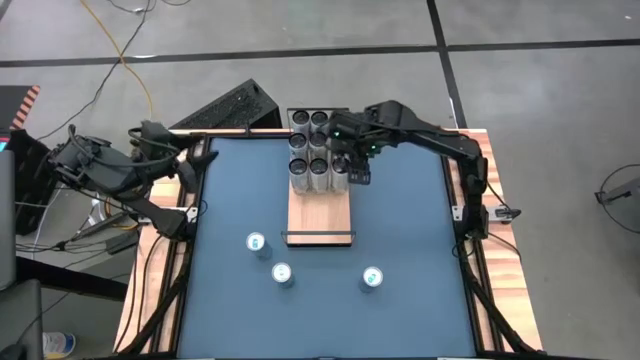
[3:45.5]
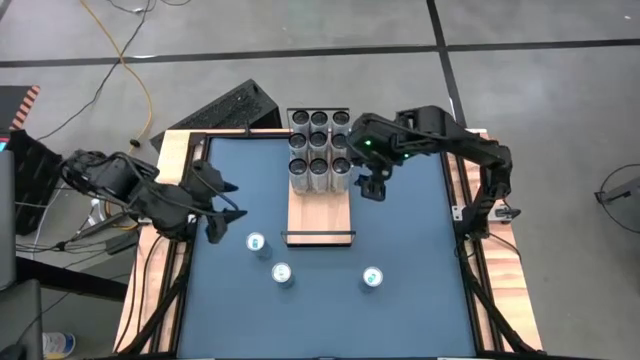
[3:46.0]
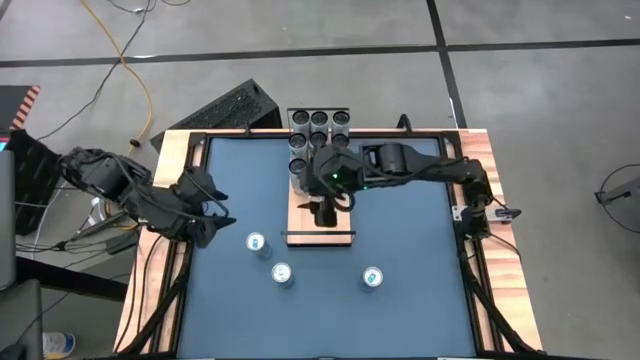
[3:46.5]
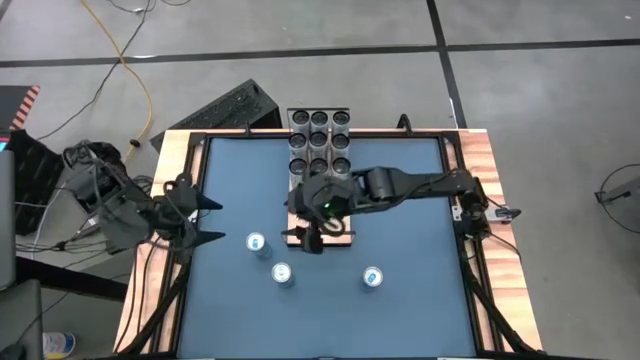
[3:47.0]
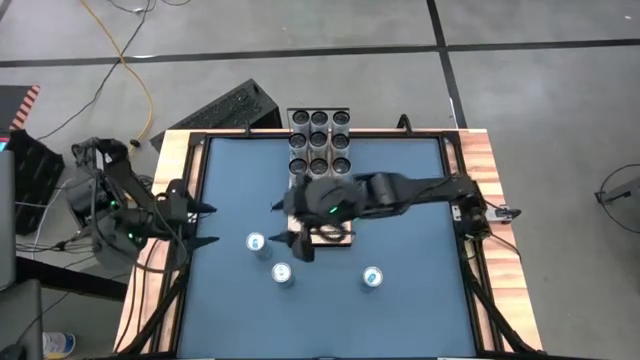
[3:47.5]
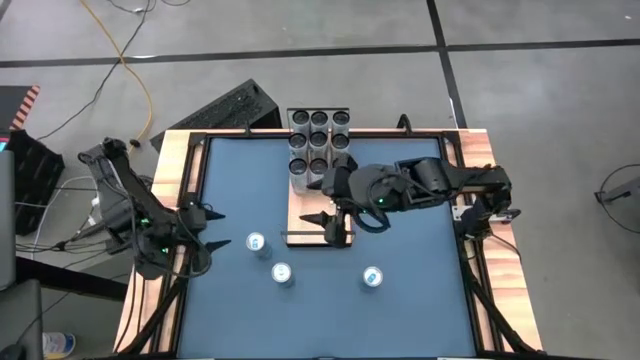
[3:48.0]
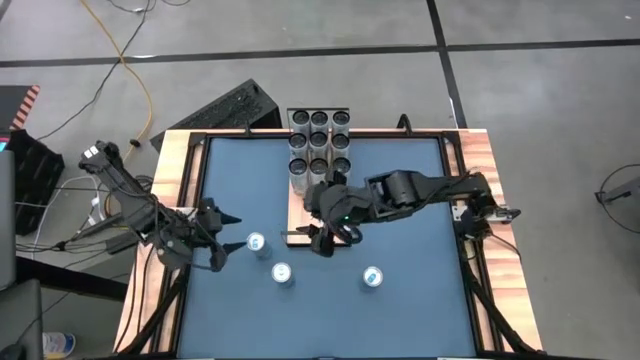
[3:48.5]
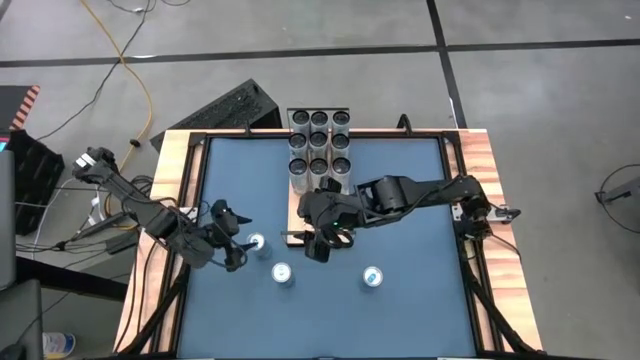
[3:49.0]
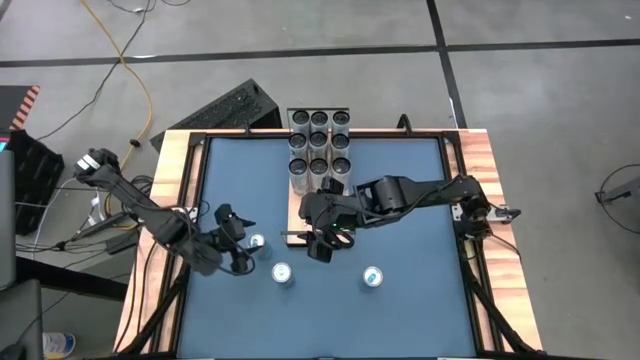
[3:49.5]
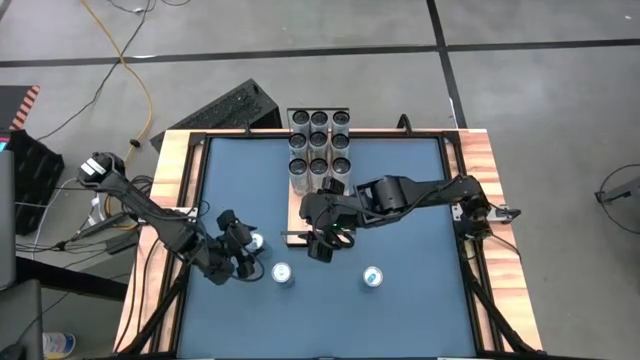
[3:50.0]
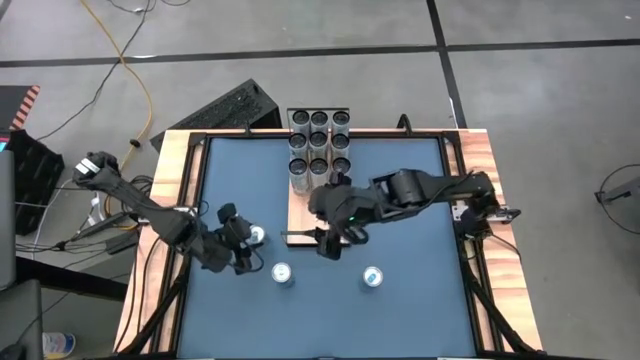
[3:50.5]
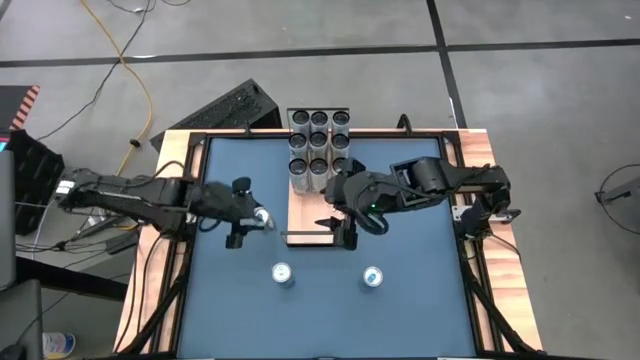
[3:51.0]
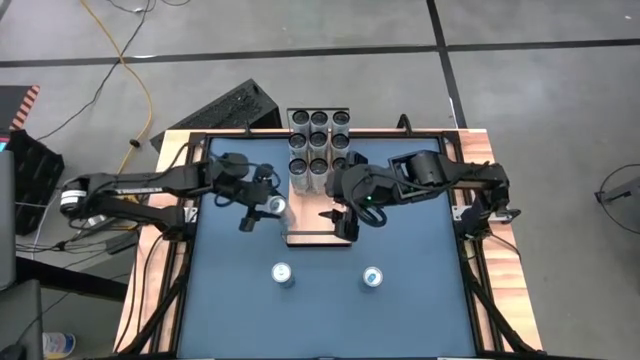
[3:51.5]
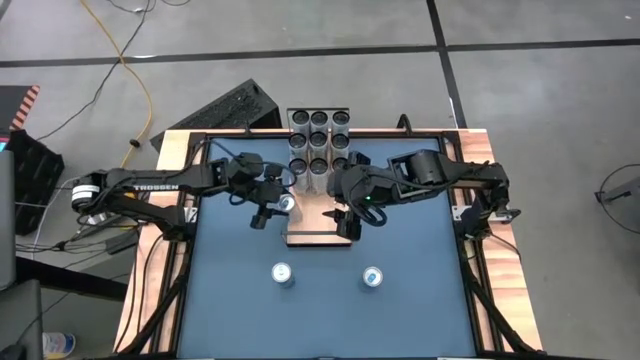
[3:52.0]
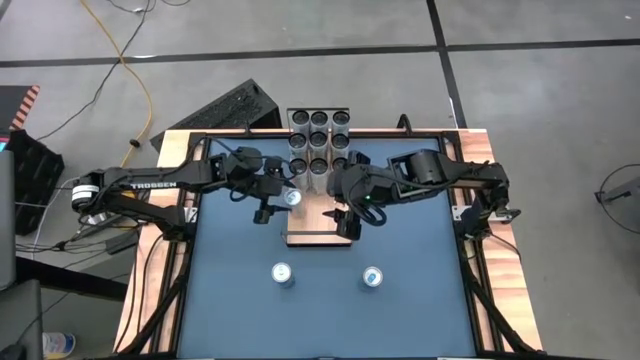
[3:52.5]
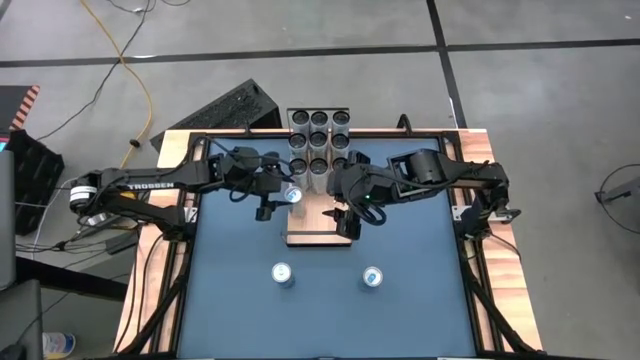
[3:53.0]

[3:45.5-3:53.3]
Task: Place canned beverage on shelf
Put the left blue soda can on the shelf

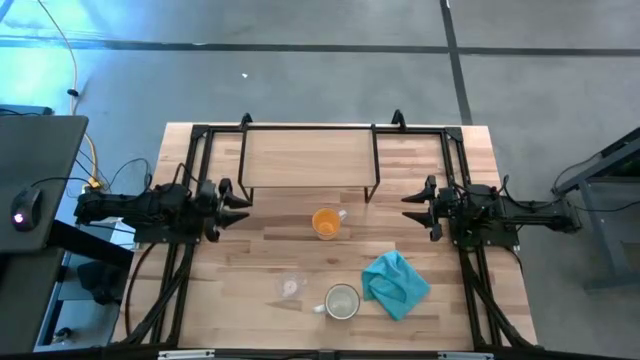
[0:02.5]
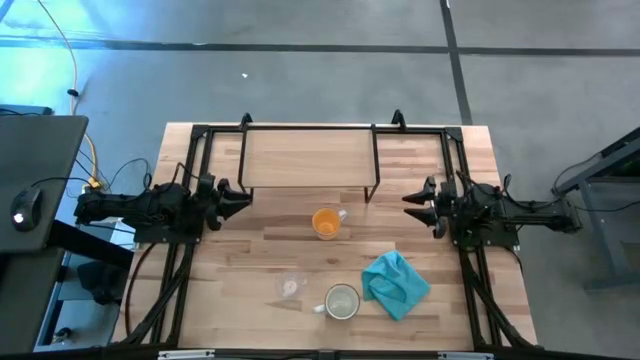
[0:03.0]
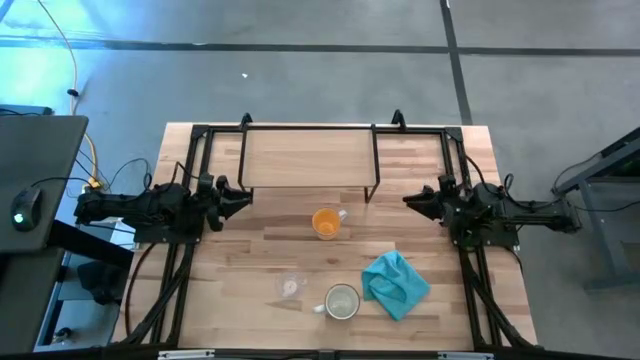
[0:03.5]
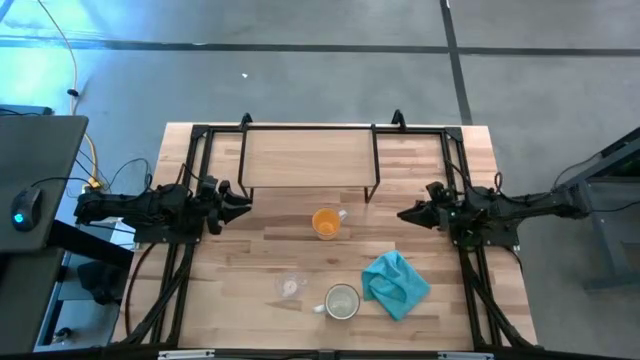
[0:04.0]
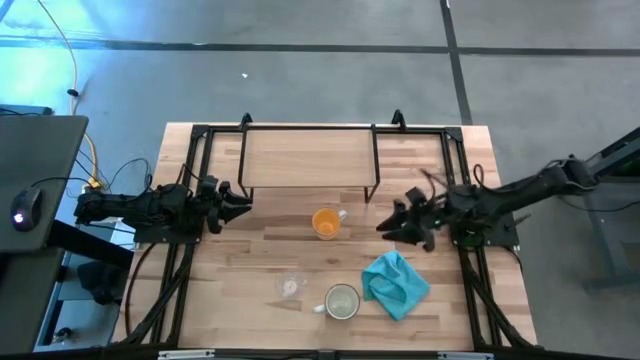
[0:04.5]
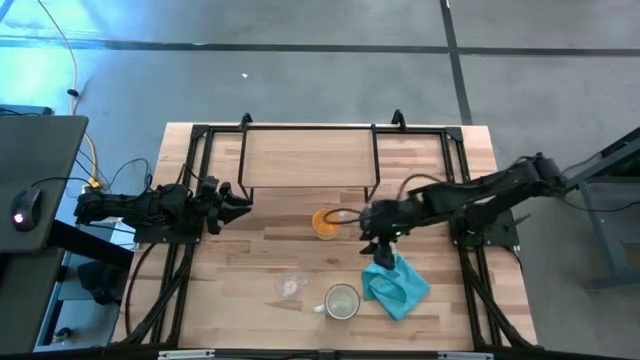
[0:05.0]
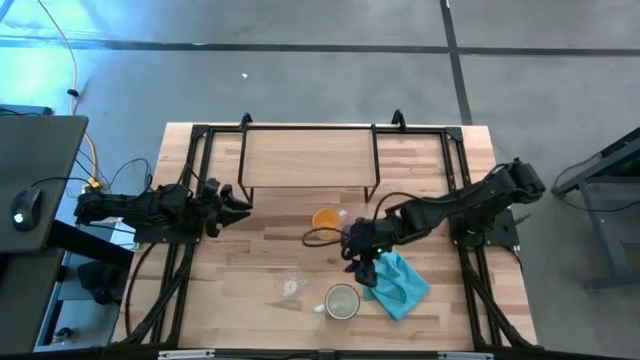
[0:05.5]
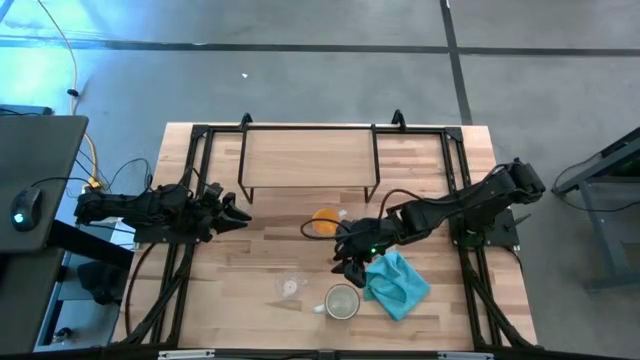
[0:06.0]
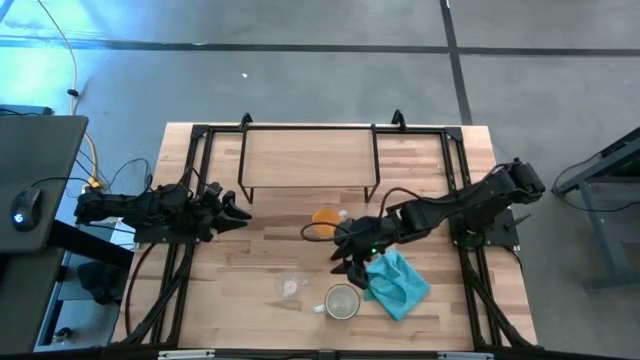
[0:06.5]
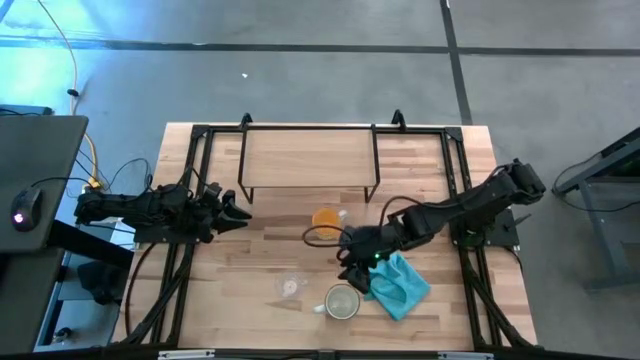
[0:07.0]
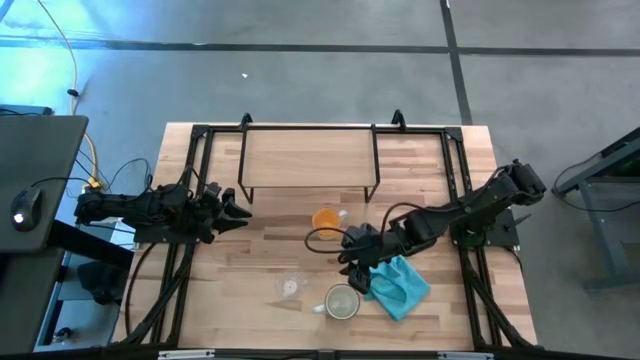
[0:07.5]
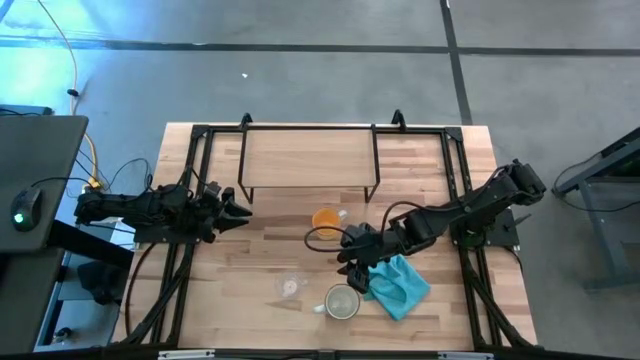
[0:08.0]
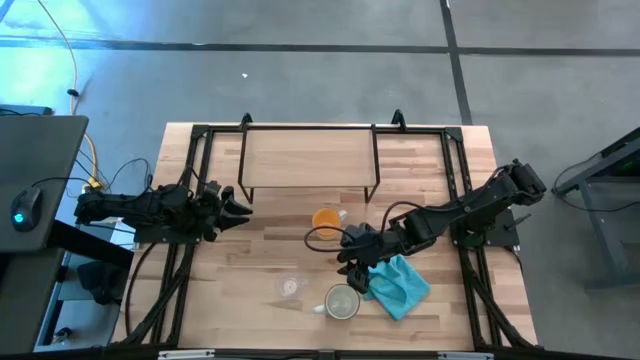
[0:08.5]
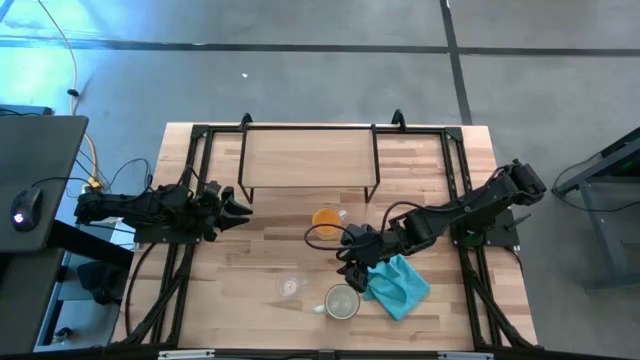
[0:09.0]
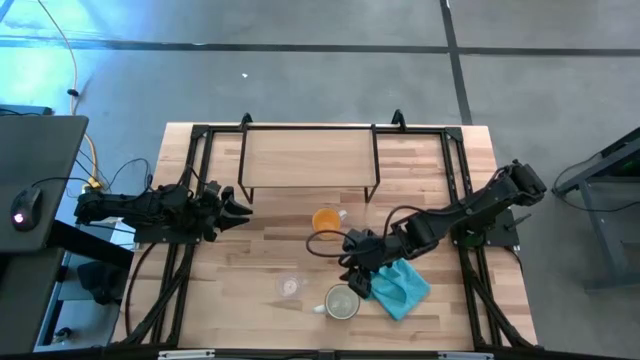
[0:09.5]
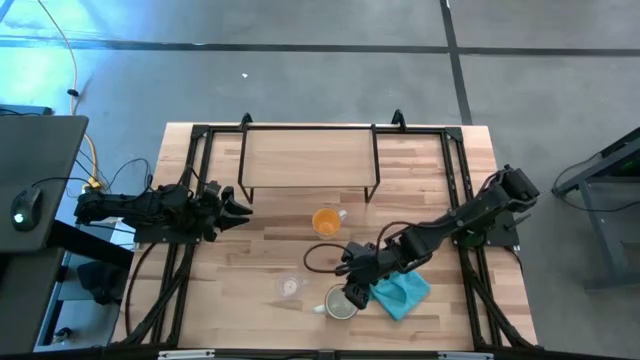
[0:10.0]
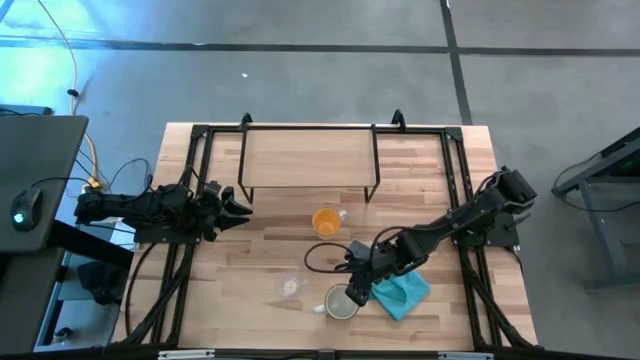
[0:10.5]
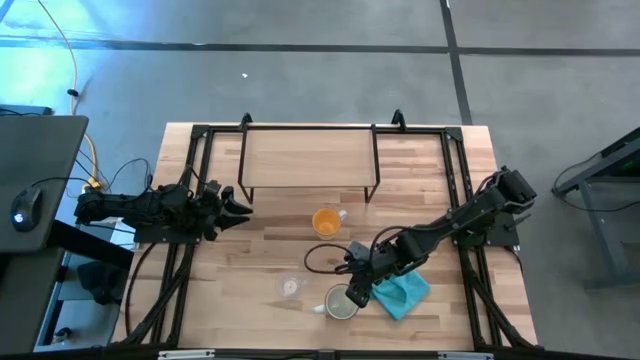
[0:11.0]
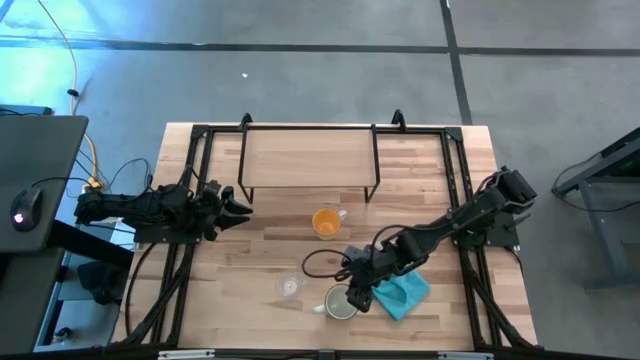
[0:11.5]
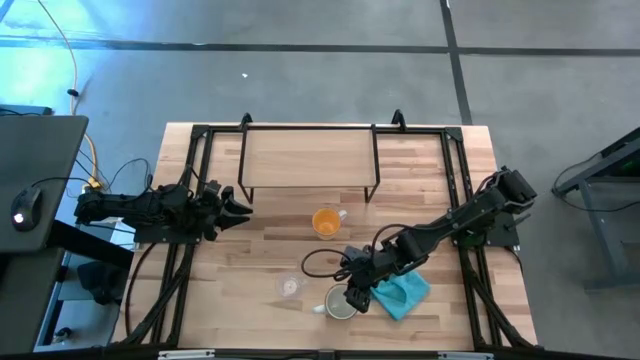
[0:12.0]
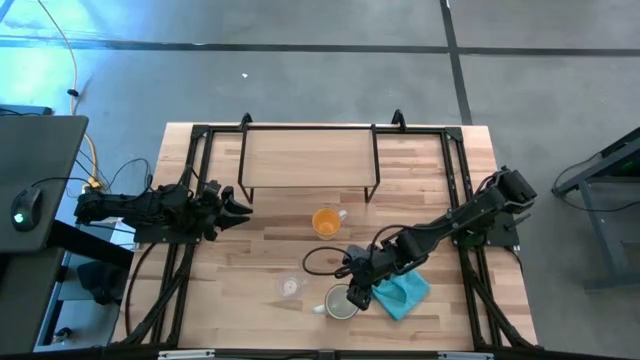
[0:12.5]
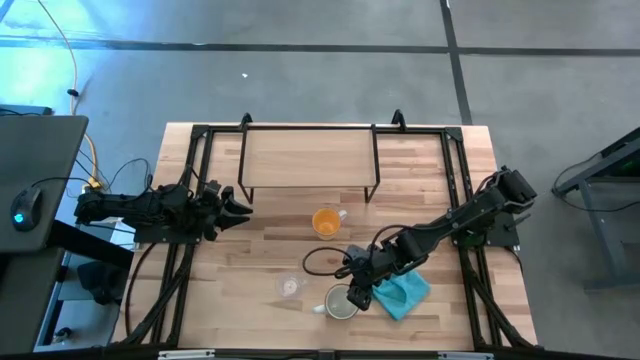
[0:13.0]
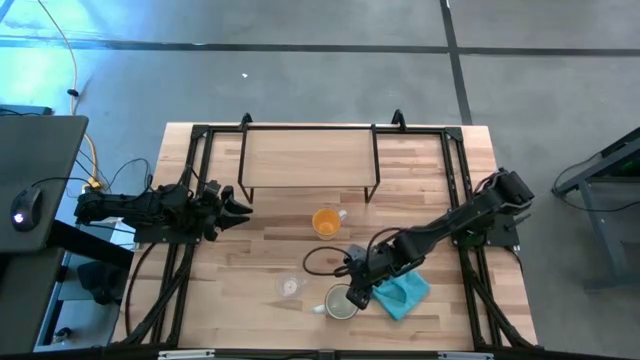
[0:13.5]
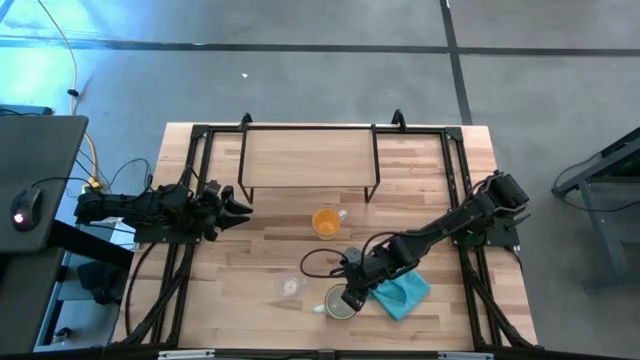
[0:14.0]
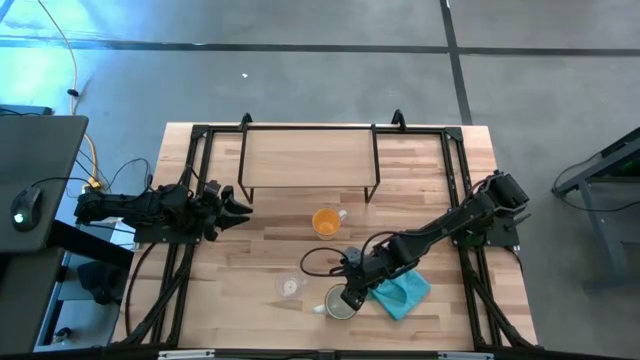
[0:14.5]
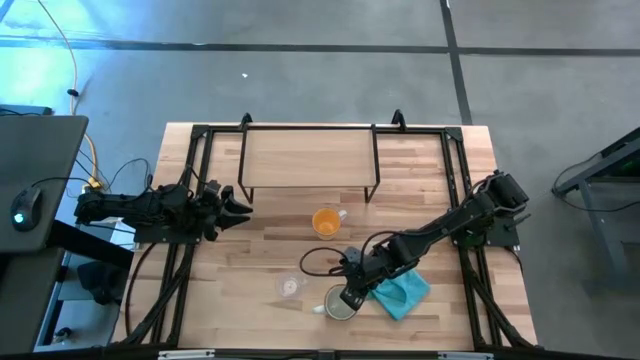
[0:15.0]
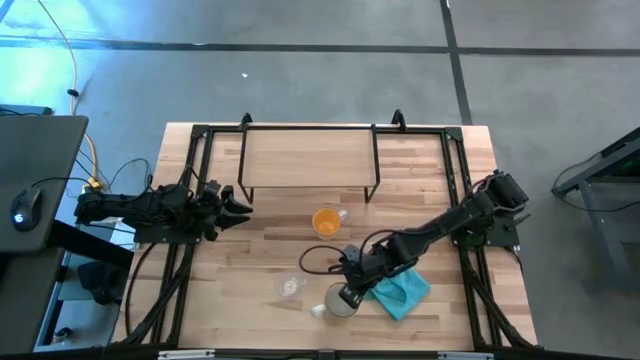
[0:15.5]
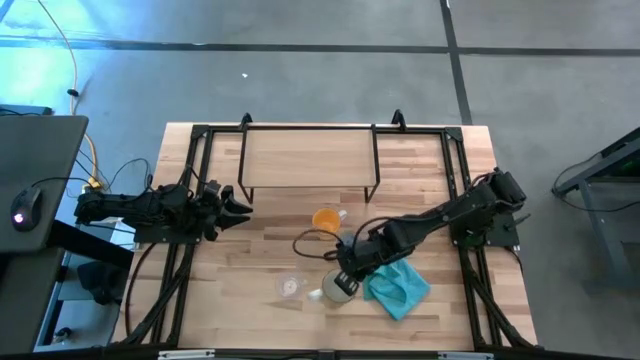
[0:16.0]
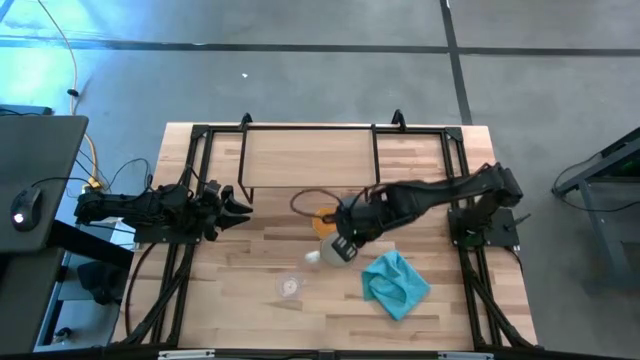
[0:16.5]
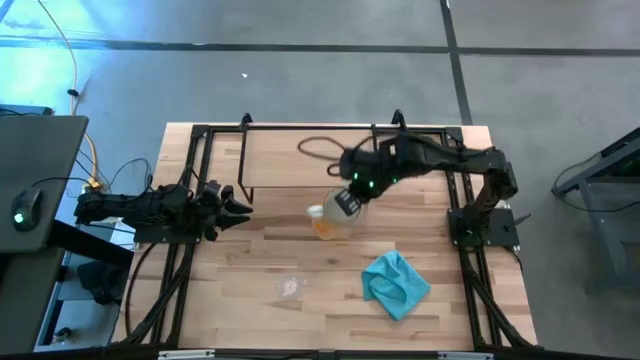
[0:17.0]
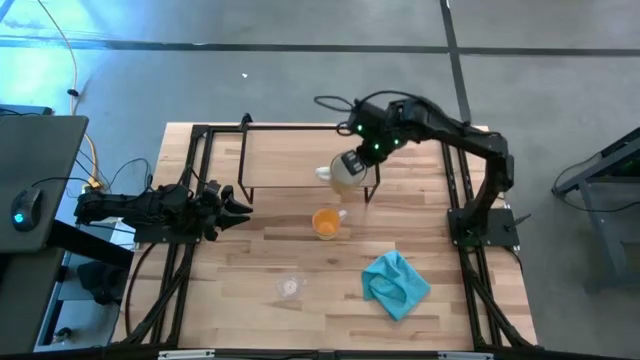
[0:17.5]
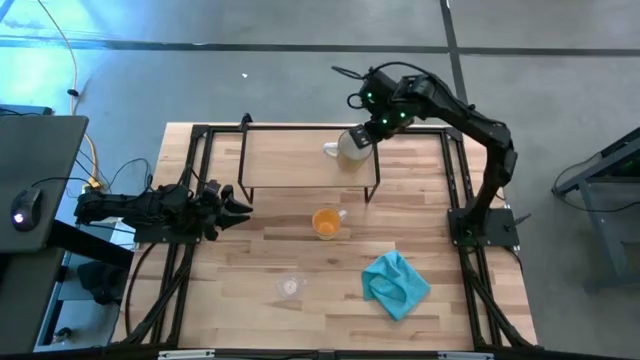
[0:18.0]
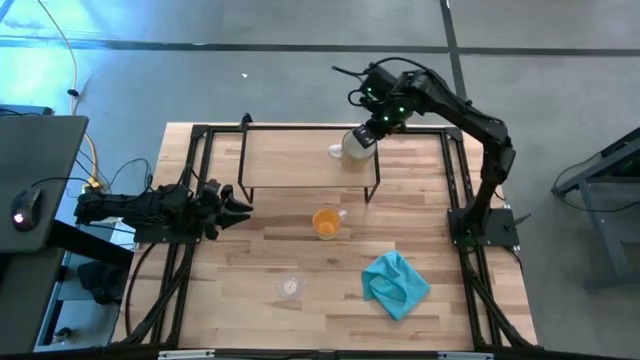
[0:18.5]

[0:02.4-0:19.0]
Task: Stack small to large cups/mugs on shelf
Put the white mug on the shelf
